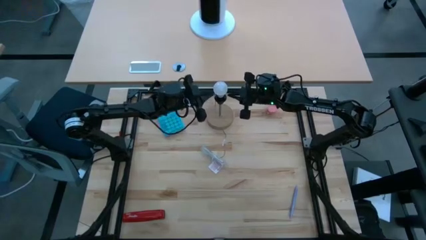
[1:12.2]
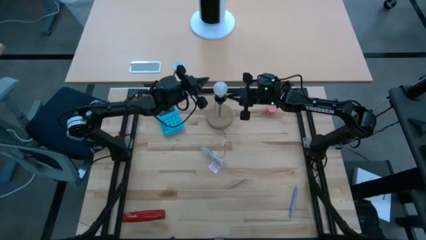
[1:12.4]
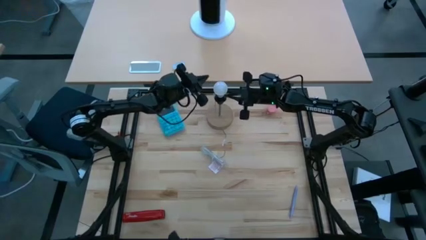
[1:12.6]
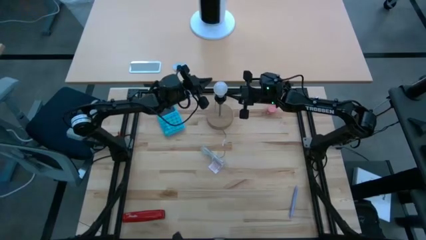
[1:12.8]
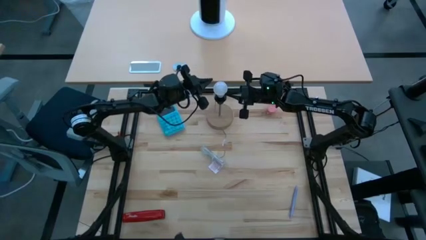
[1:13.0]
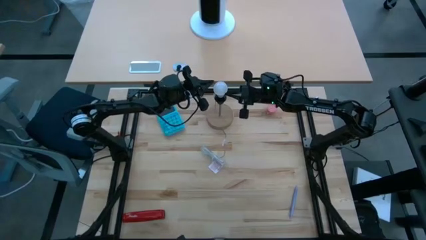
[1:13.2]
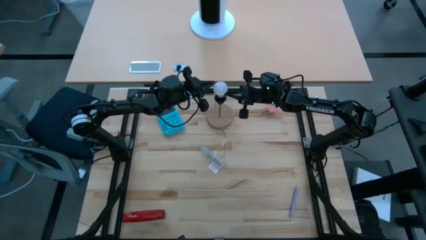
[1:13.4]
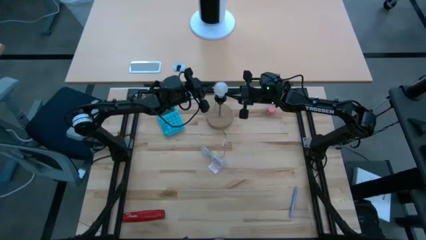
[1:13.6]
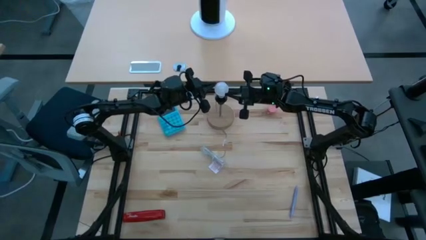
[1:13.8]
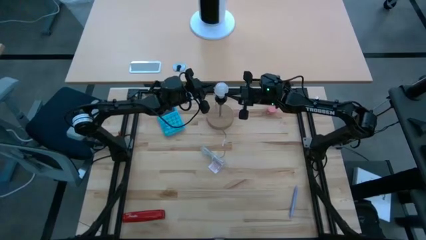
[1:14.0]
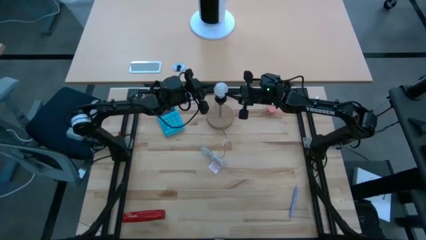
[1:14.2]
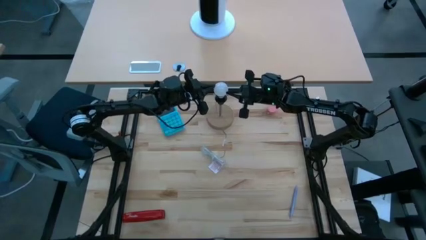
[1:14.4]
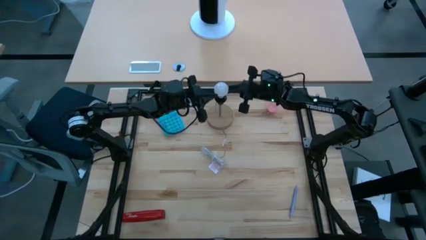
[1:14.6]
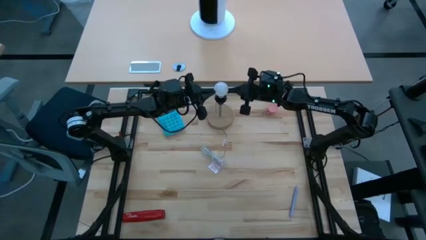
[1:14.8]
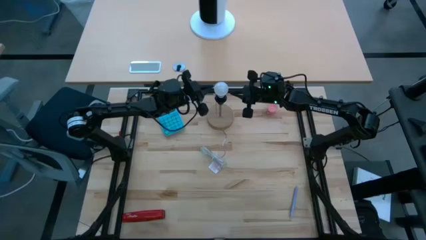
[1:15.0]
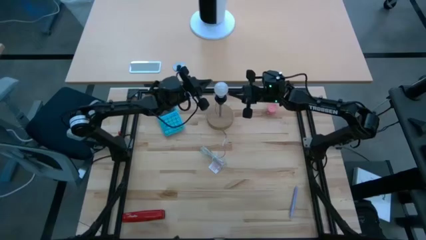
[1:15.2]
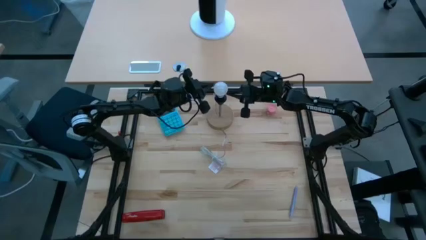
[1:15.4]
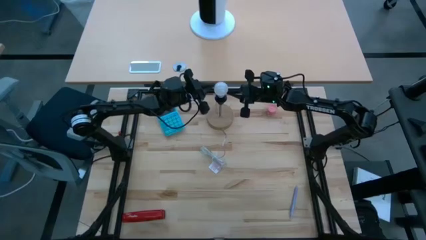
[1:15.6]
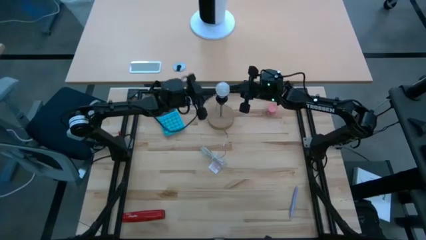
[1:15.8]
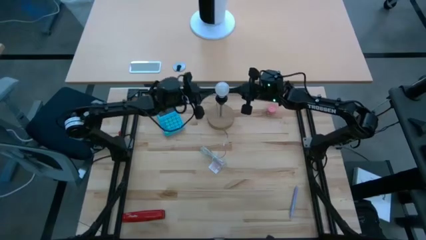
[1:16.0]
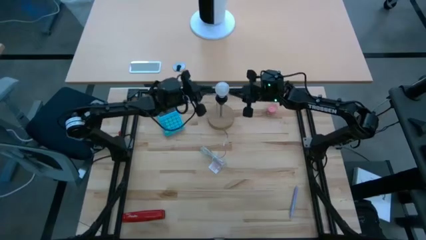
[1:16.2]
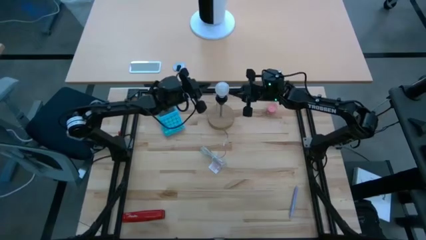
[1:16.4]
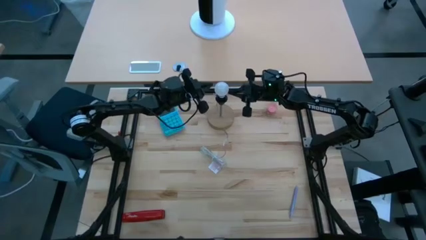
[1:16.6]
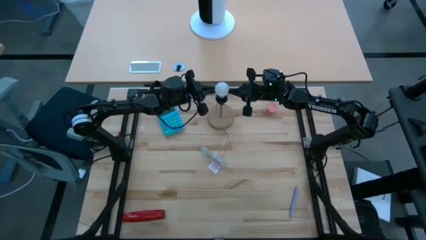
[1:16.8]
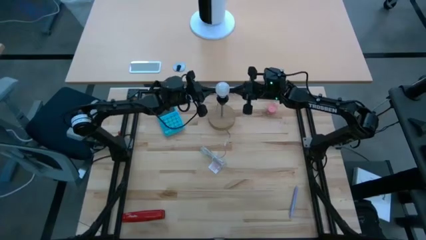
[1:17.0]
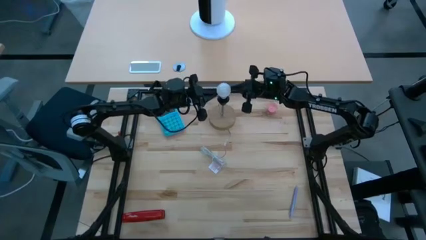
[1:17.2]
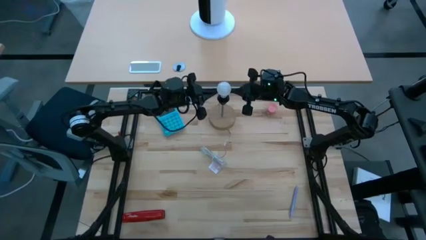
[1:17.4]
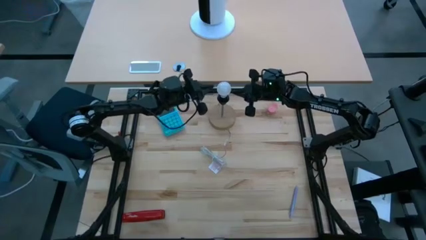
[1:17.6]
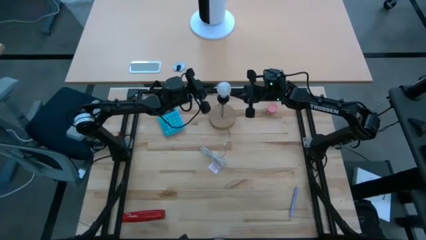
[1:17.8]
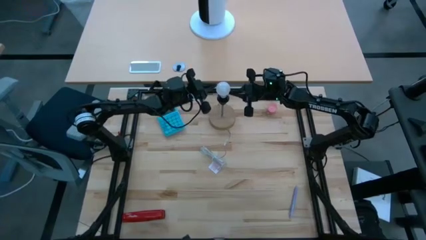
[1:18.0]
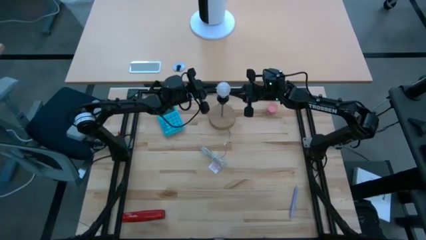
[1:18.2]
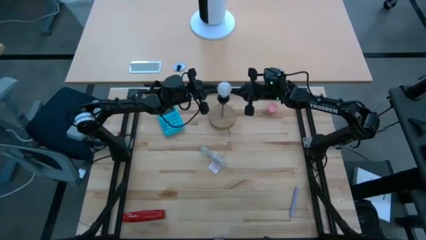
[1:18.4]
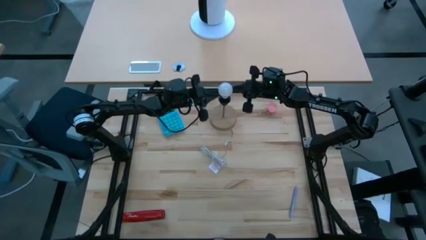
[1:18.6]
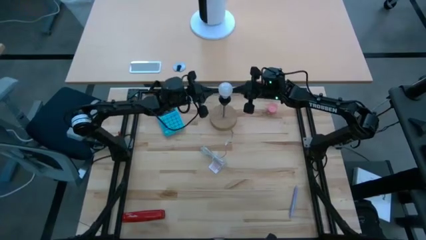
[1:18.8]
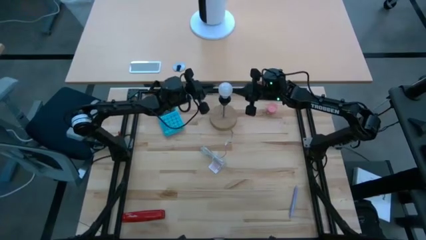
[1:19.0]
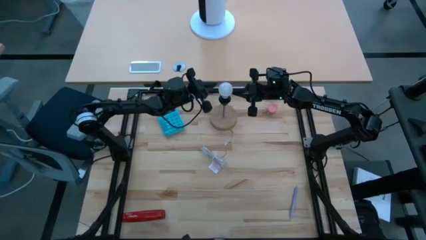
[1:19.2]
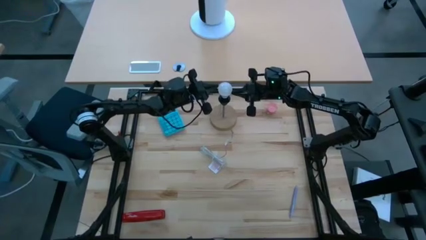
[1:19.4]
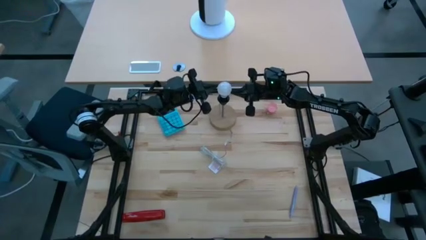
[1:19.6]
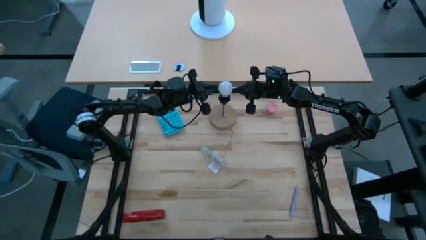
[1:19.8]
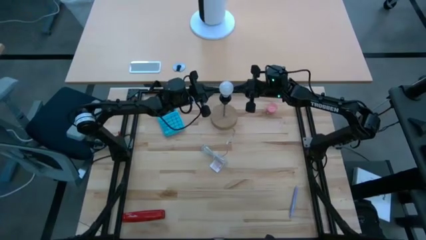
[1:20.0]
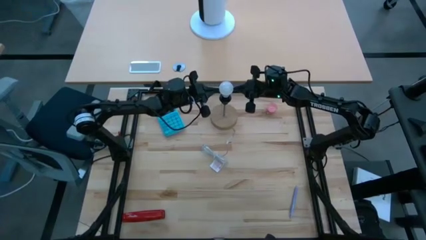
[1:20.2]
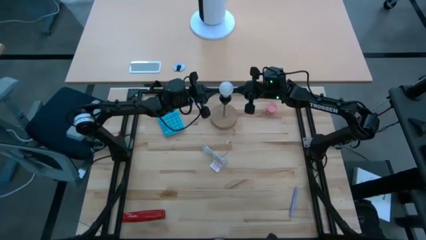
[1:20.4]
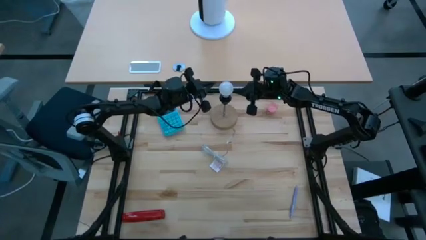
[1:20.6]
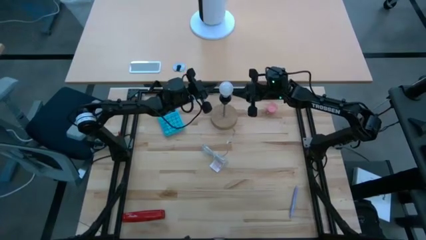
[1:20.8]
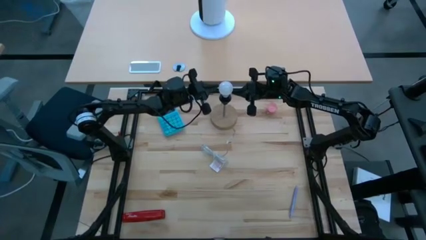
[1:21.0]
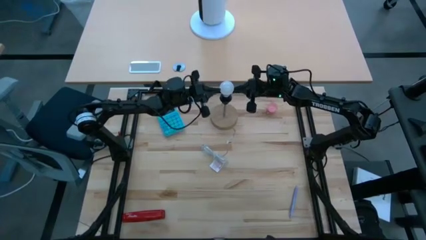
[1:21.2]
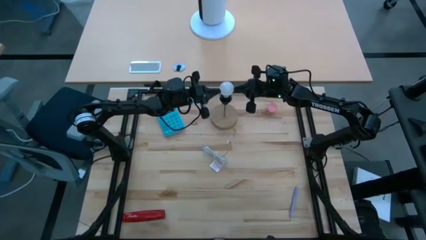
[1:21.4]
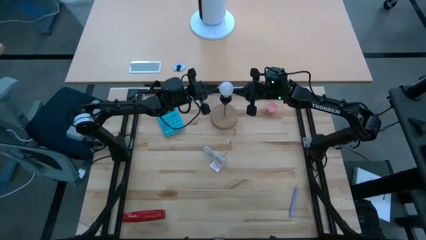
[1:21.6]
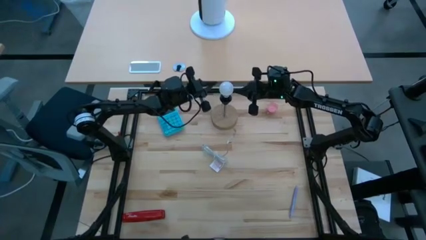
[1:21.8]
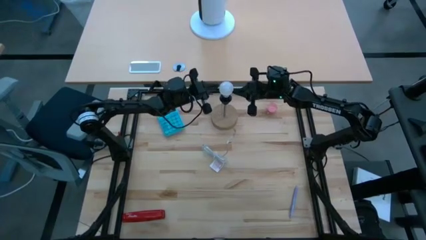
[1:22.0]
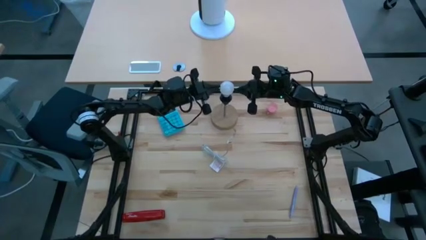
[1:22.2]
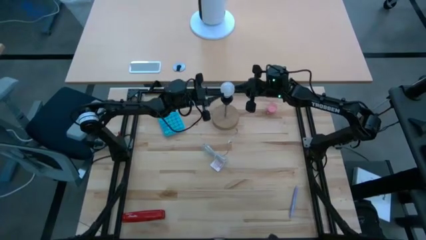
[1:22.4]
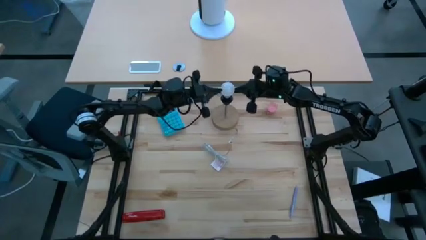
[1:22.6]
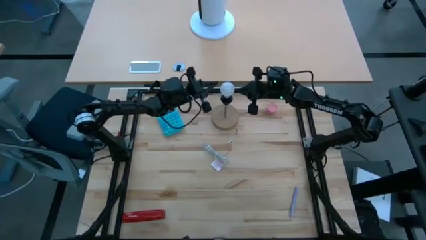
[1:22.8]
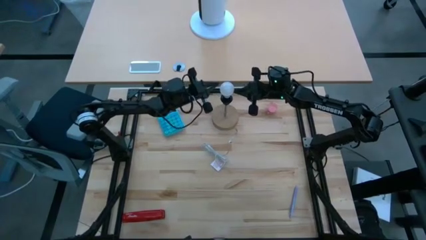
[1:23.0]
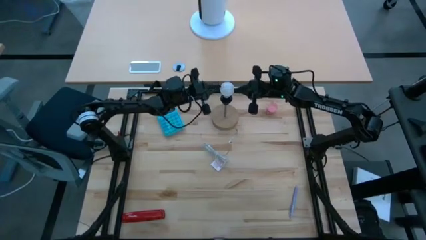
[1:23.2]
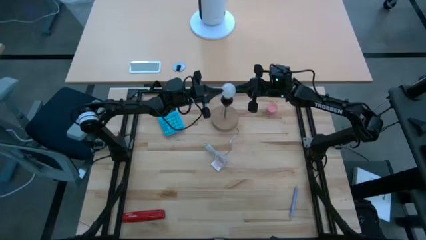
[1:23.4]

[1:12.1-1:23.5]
Task: Screw lightbulb
Remove the light bulb from the desk lamp
